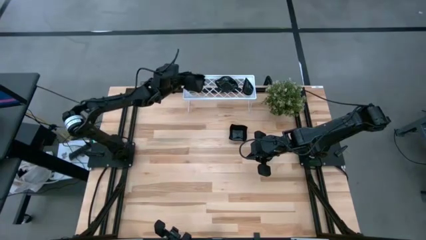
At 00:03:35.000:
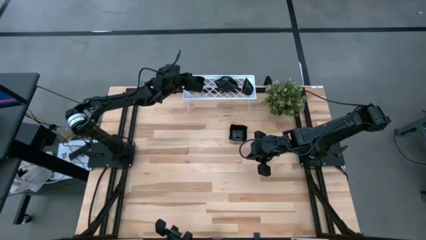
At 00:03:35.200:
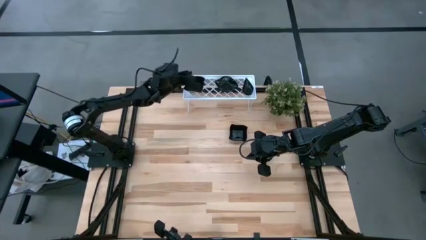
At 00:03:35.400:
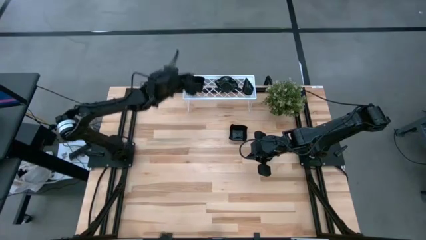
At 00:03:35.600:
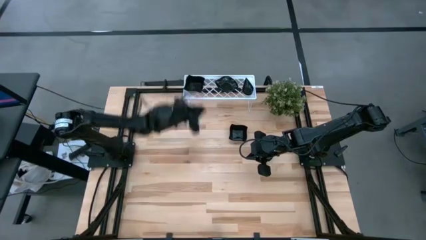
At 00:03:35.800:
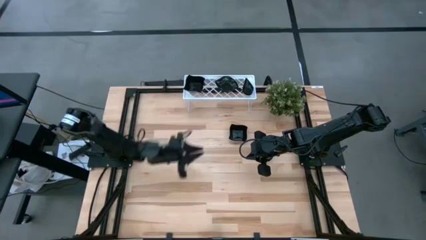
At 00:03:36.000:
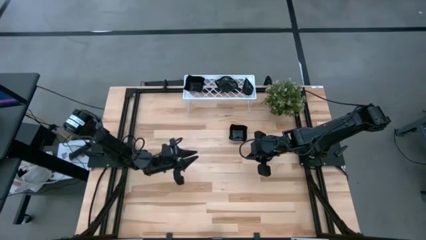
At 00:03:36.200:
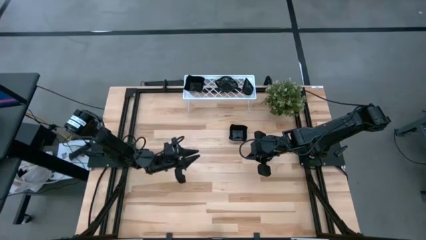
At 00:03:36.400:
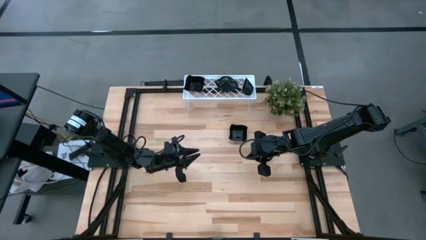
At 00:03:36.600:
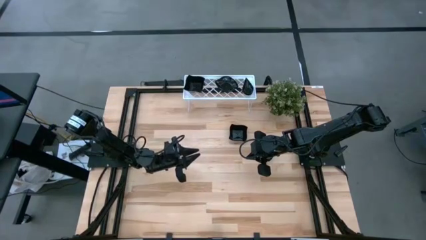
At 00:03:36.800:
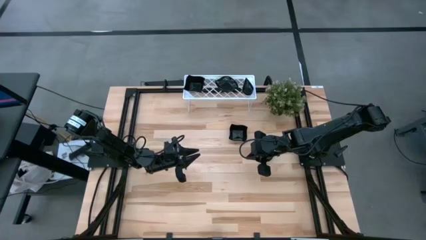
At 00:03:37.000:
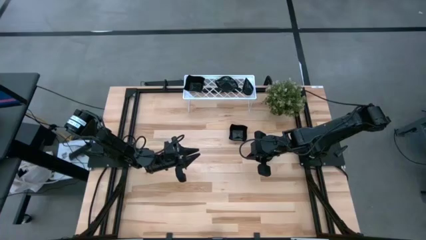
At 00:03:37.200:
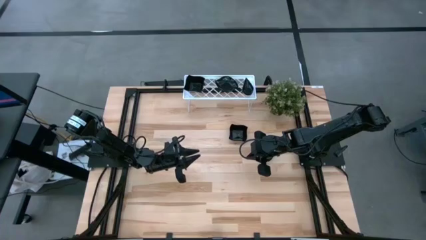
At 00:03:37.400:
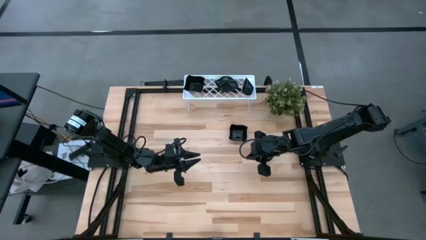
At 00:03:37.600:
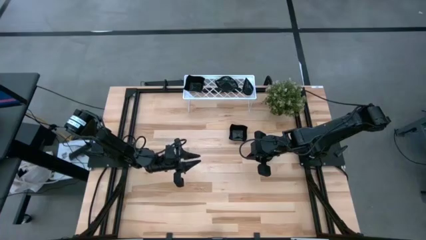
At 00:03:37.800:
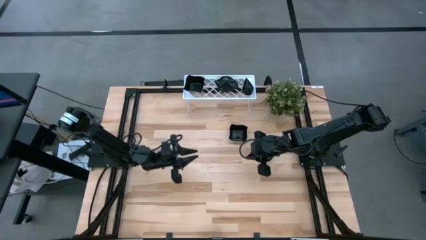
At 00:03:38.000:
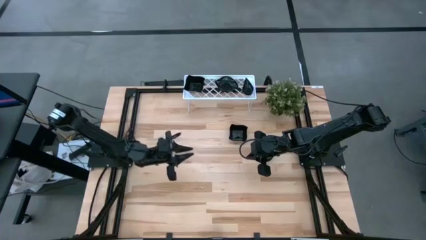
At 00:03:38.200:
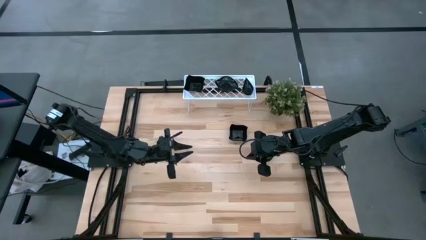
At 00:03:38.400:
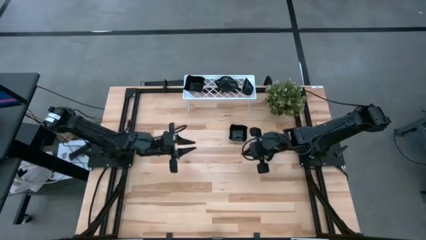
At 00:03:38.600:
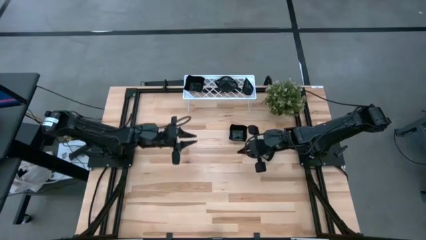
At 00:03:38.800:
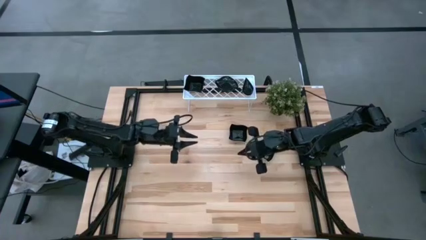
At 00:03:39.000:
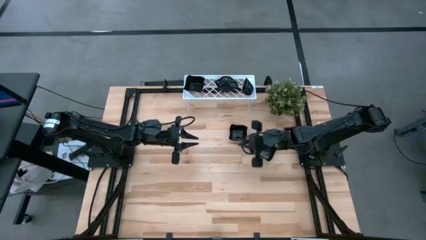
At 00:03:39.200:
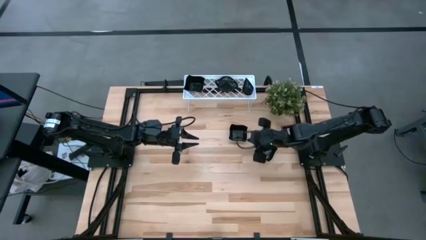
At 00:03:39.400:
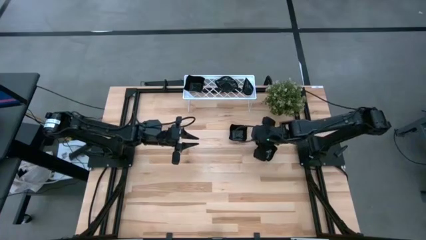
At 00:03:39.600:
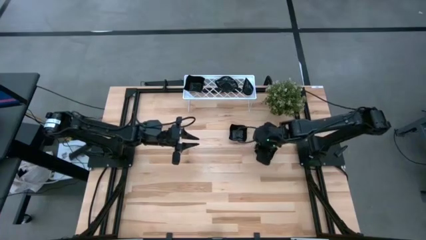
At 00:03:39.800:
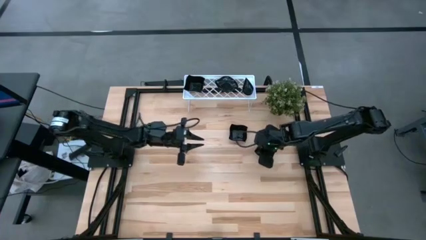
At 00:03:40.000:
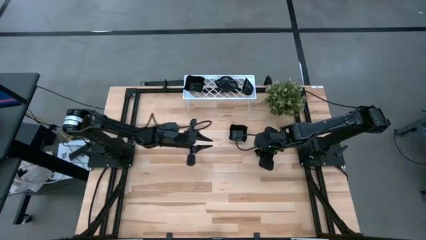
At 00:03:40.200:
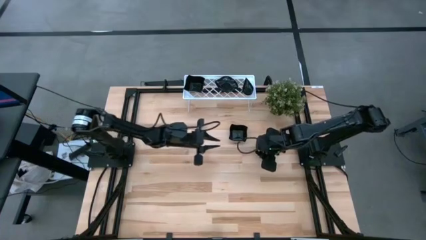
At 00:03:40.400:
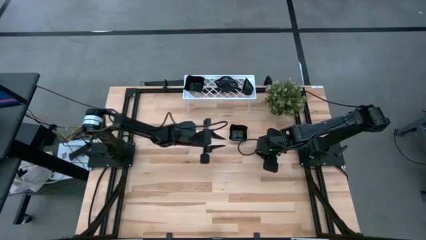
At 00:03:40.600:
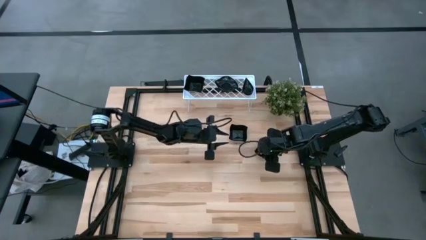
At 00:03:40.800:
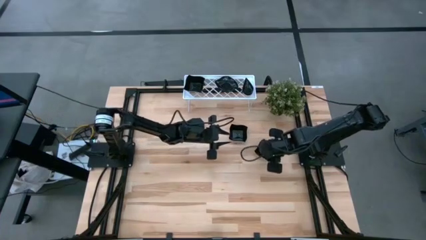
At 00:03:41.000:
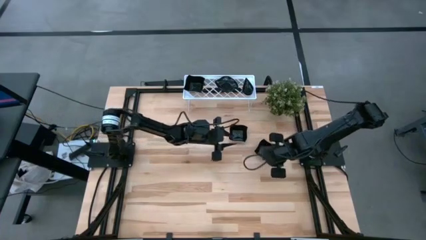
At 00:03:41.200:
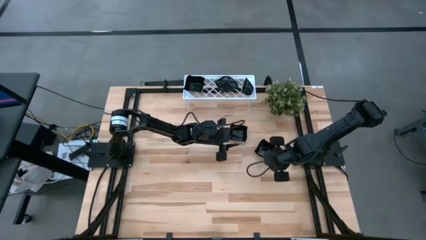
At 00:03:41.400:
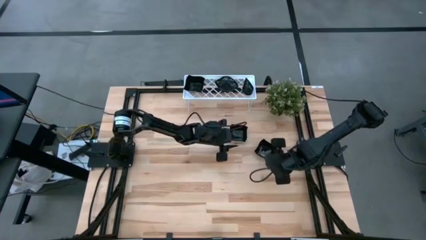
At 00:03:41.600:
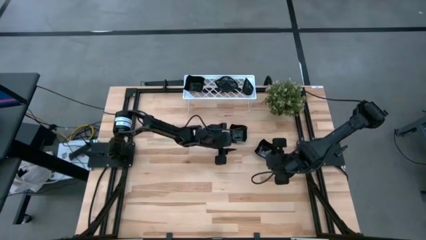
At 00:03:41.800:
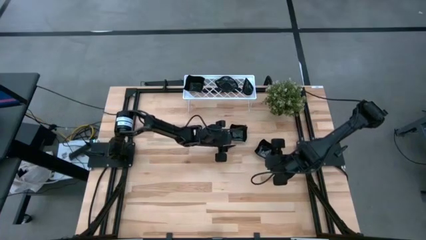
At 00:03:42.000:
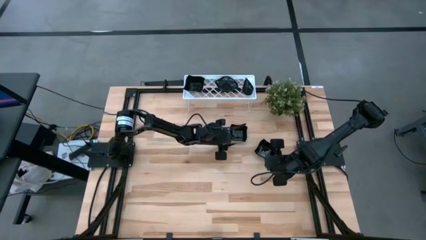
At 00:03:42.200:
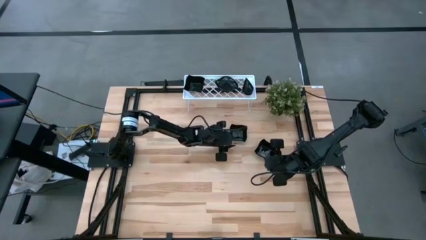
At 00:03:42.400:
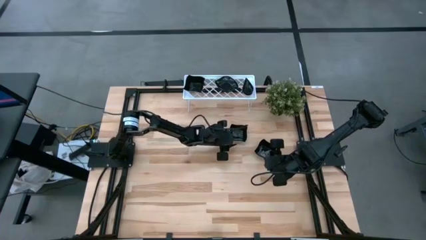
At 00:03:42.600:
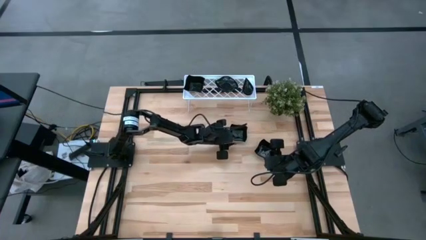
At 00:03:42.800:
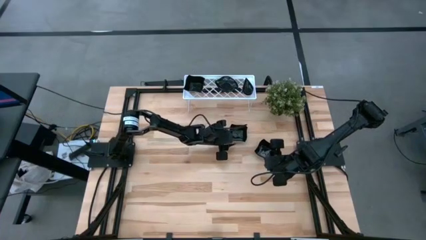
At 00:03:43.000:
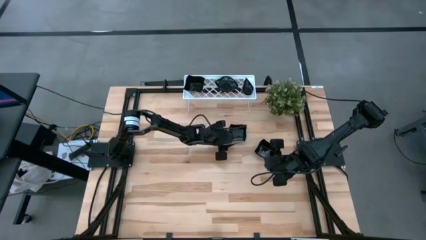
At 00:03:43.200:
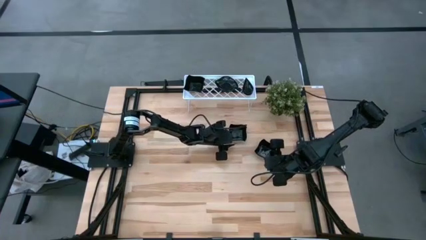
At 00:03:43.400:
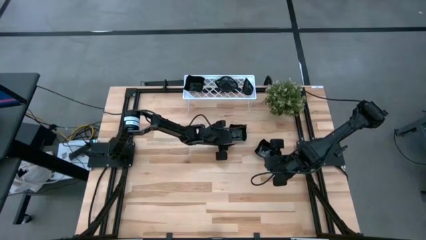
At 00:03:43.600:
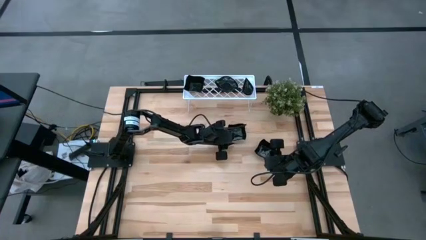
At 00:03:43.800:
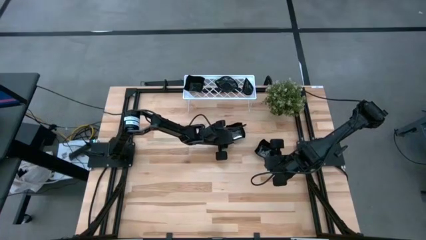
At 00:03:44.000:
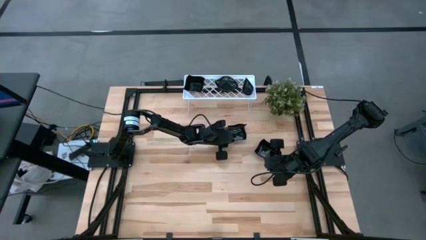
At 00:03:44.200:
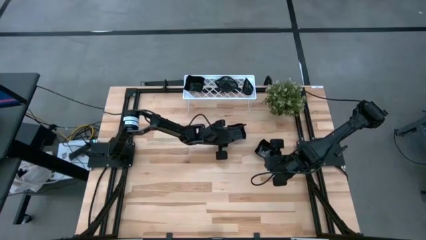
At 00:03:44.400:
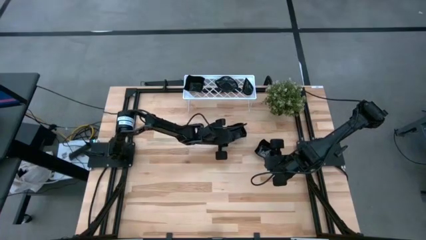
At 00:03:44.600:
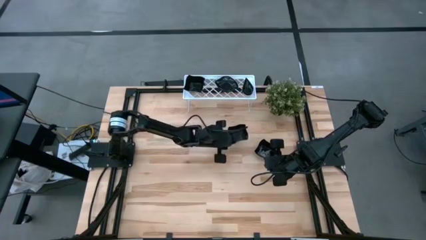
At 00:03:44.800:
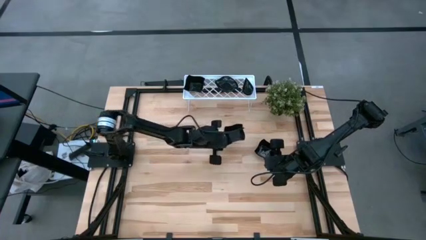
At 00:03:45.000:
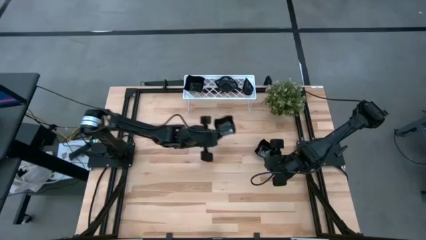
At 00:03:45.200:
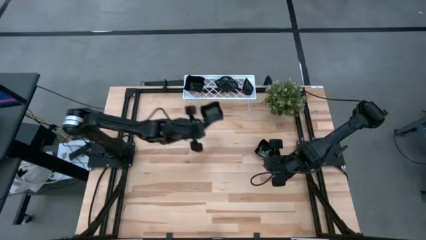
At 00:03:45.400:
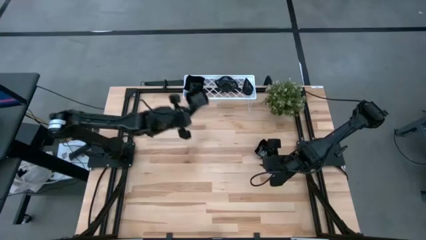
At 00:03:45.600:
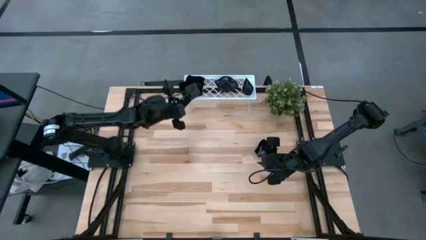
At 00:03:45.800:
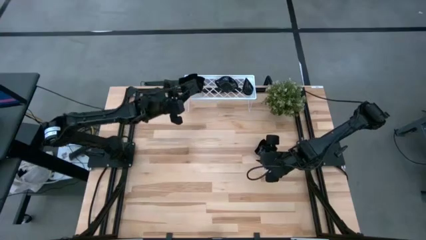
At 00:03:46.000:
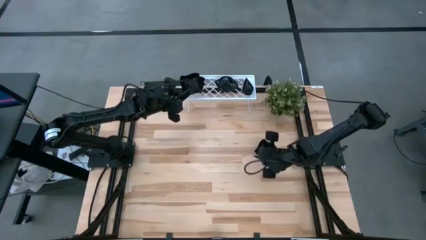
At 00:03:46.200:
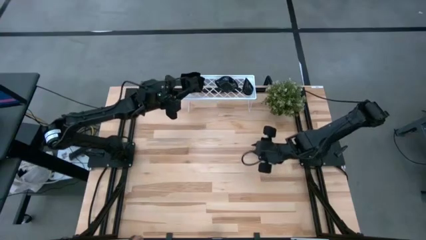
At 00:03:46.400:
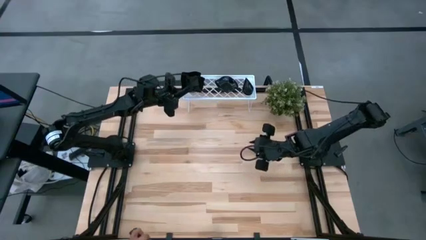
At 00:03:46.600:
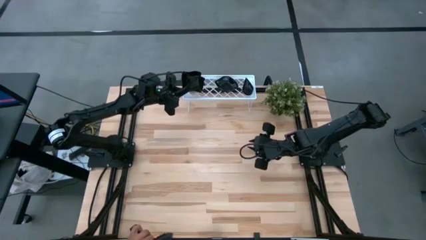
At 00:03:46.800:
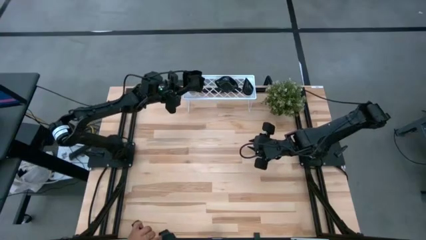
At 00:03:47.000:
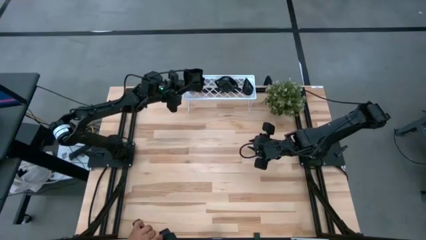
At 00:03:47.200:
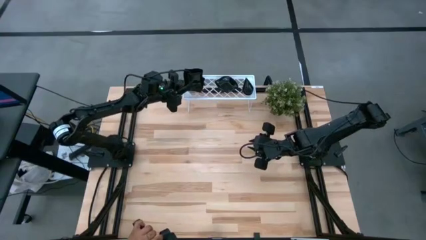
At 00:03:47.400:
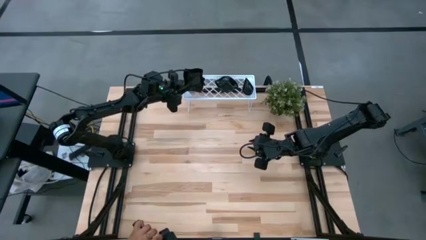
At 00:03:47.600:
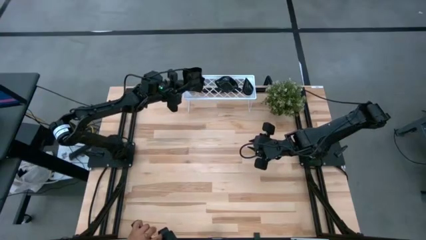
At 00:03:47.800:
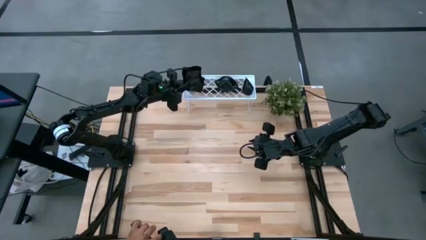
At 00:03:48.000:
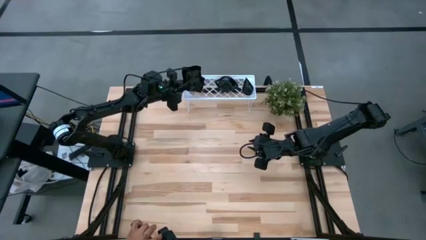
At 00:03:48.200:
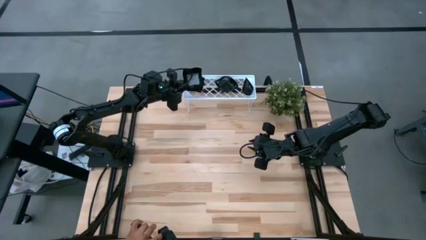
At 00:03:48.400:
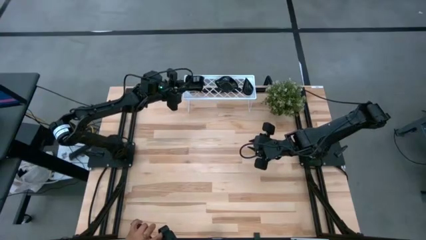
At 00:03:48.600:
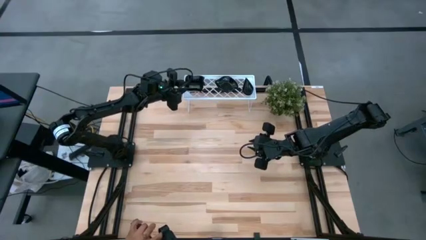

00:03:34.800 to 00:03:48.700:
Task: Pick & Place Mini shaped plates
Stack the distorted square plate on top of the distorted square plate on the shelf

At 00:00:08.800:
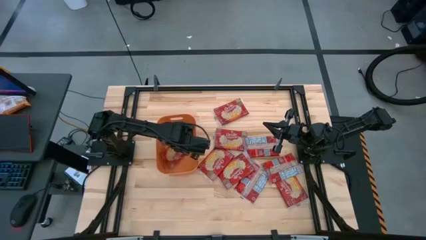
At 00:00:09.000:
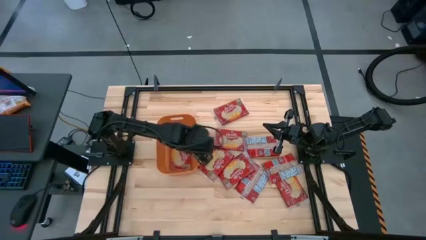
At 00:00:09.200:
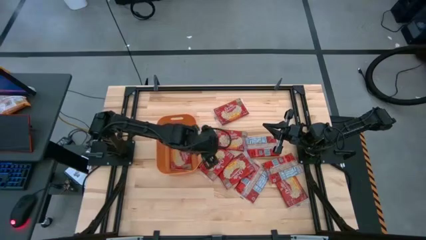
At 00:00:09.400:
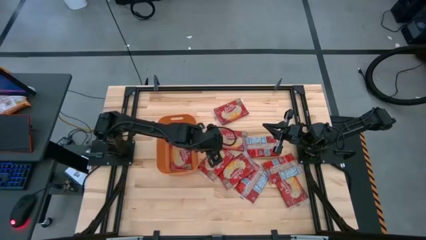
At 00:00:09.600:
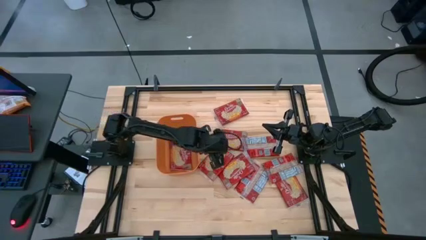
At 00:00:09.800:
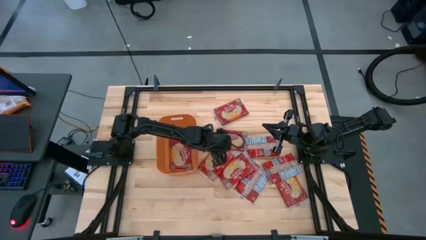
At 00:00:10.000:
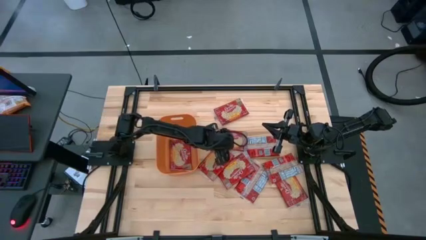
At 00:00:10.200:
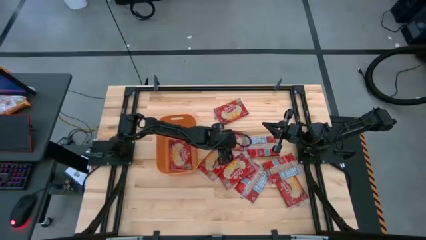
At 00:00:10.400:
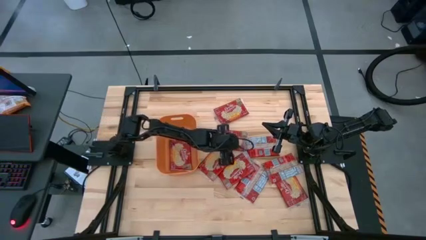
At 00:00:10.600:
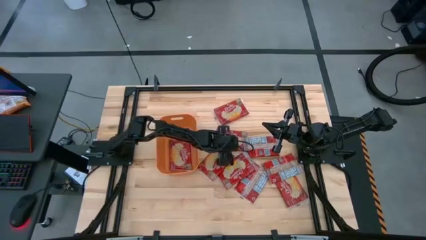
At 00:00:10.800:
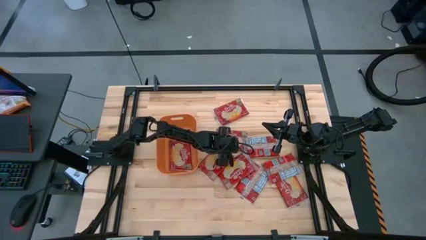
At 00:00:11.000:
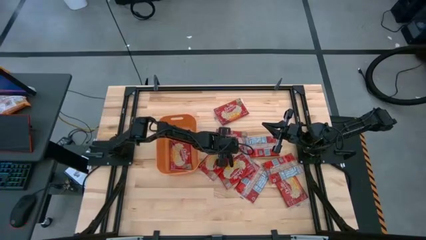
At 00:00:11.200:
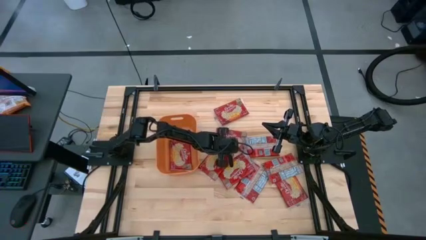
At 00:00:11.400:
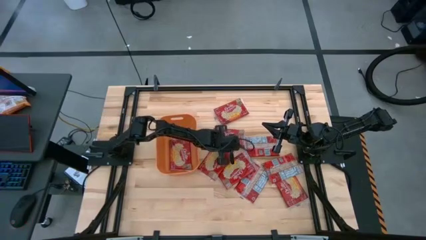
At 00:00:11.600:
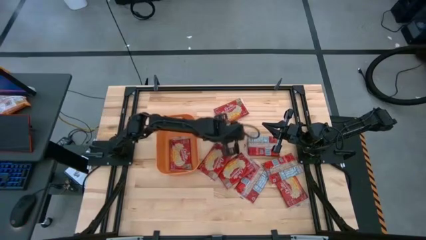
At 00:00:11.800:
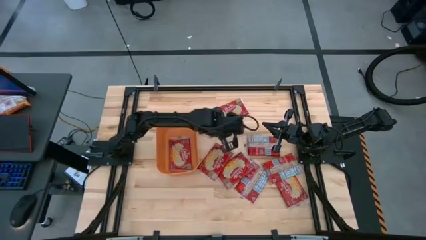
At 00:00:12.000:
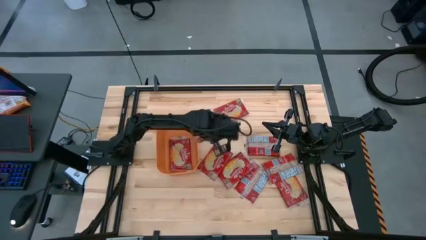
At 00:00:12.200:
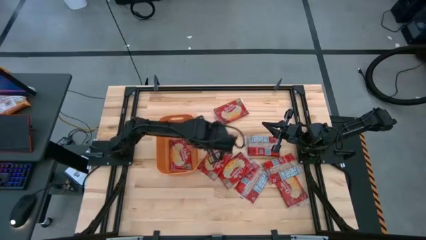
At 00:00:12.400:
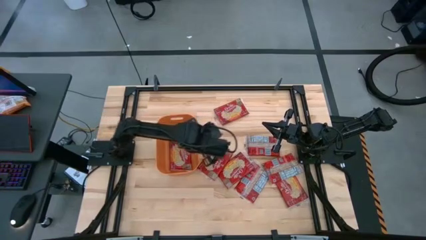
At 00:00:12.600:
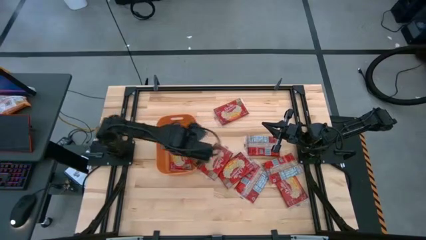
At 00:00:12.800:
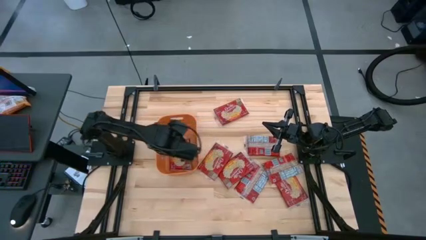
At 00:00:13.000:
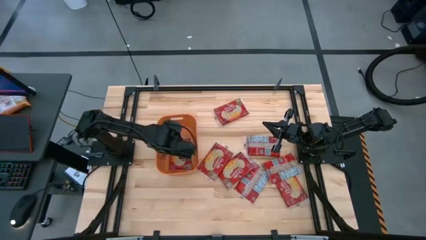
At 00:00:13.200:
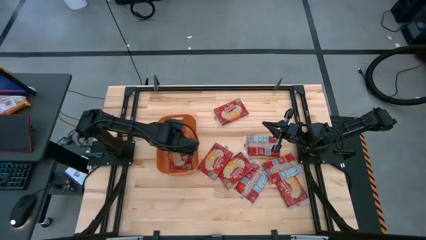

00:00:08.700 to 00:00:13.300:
Task: Sort popcorn bags into baskets
Put the popcorn bag into the orange bin
